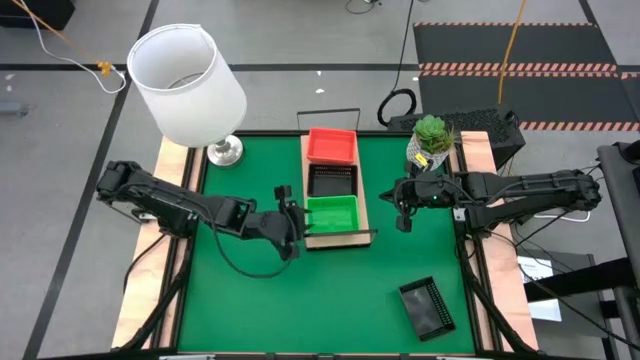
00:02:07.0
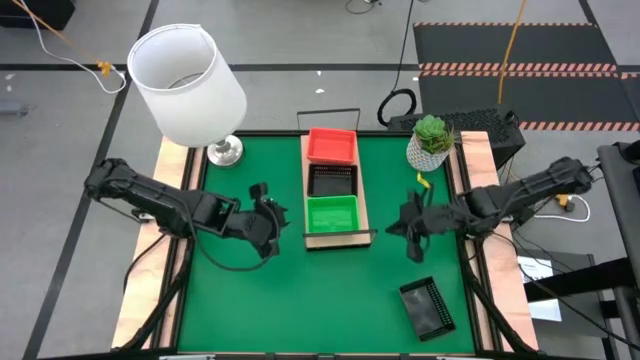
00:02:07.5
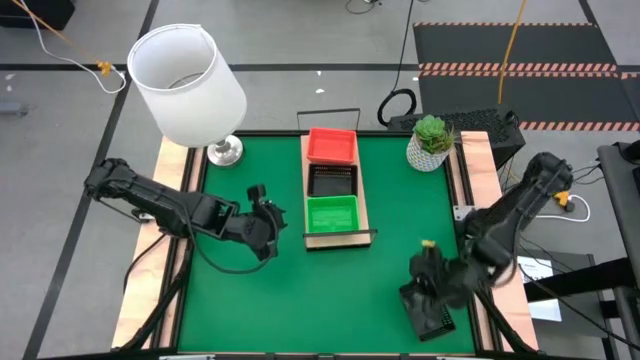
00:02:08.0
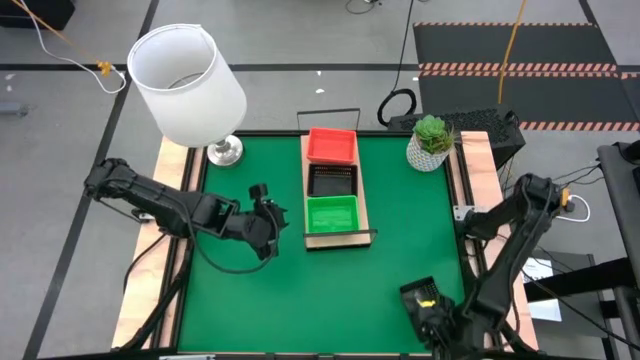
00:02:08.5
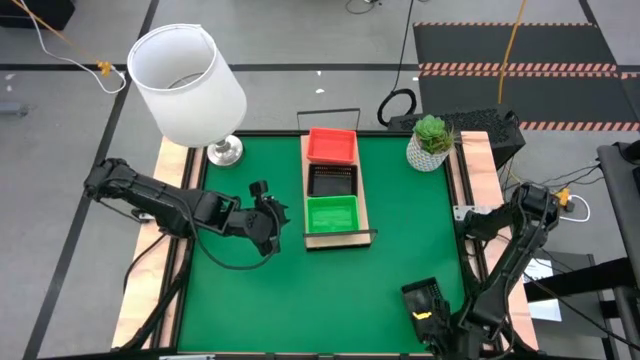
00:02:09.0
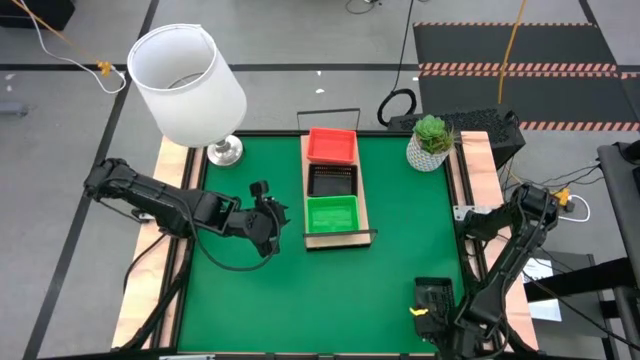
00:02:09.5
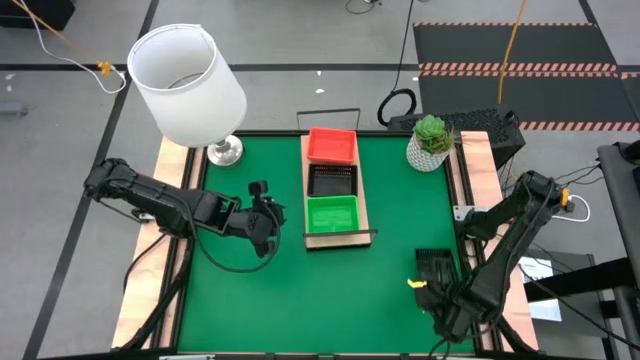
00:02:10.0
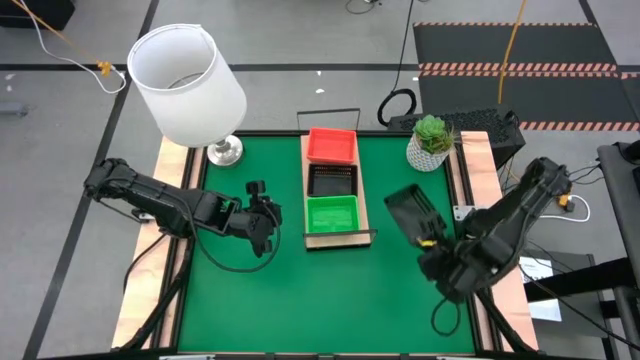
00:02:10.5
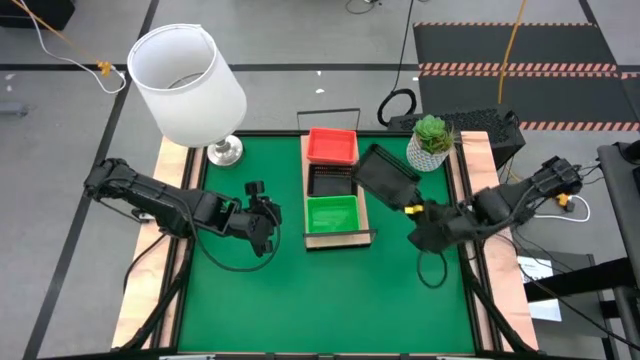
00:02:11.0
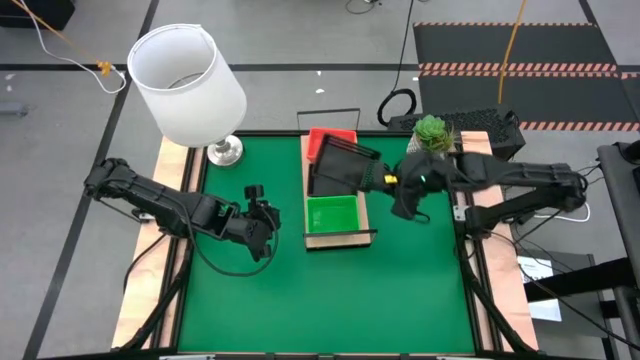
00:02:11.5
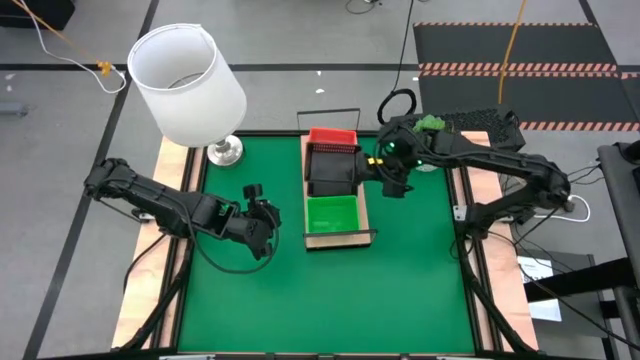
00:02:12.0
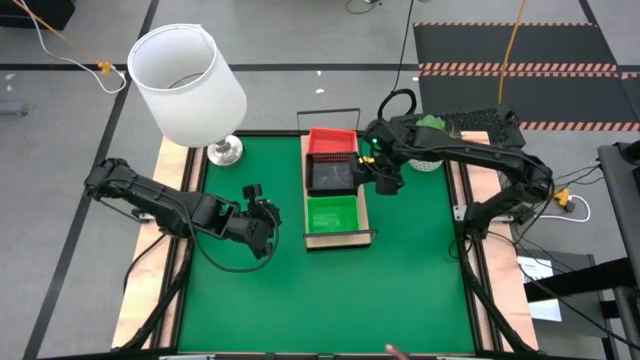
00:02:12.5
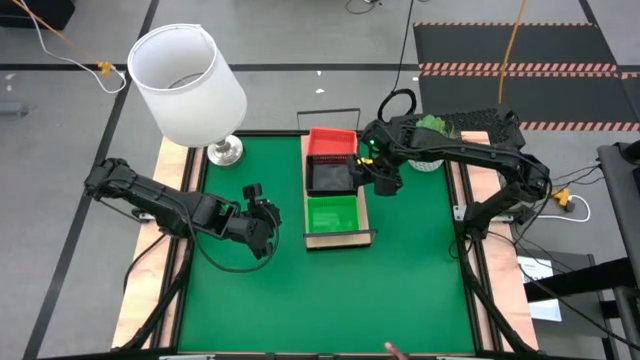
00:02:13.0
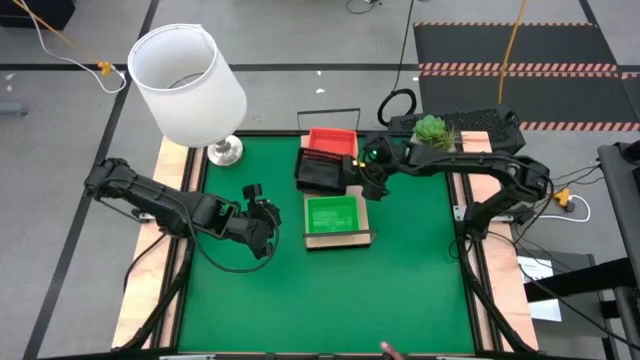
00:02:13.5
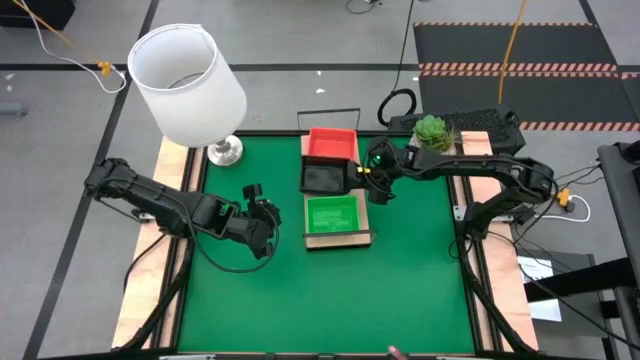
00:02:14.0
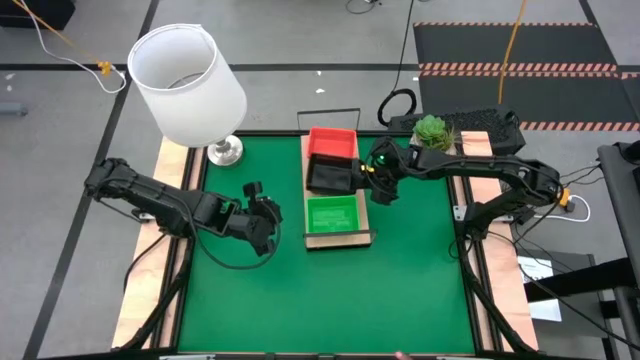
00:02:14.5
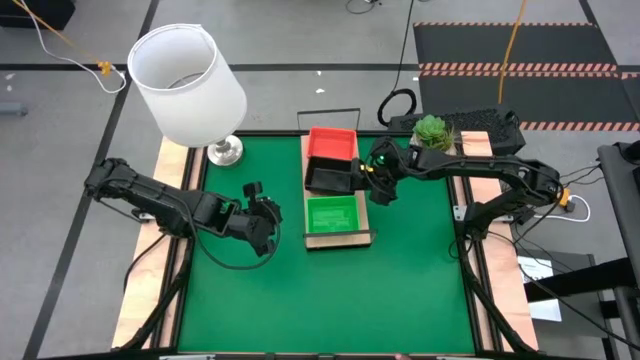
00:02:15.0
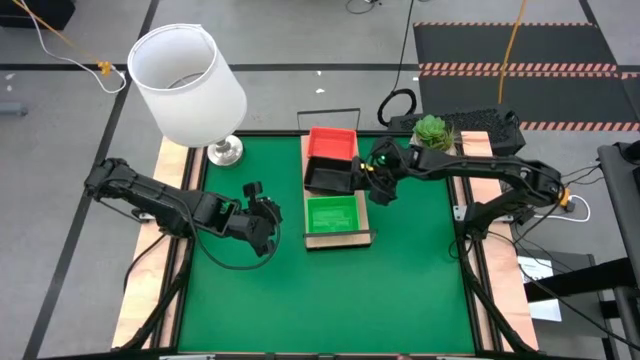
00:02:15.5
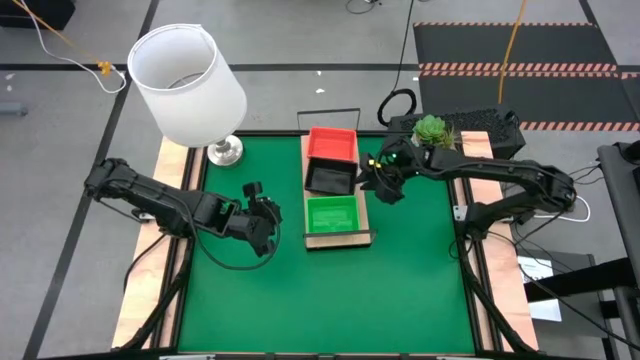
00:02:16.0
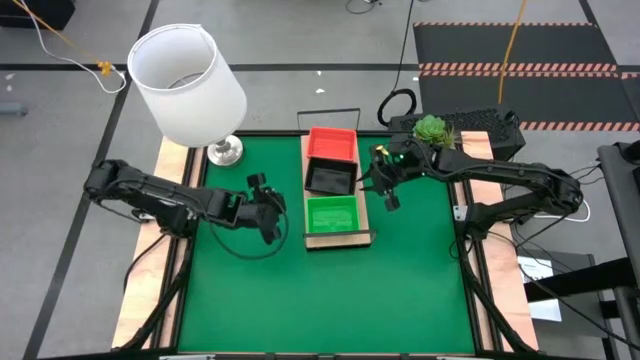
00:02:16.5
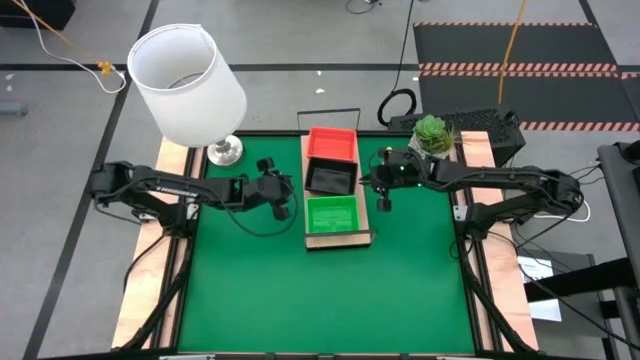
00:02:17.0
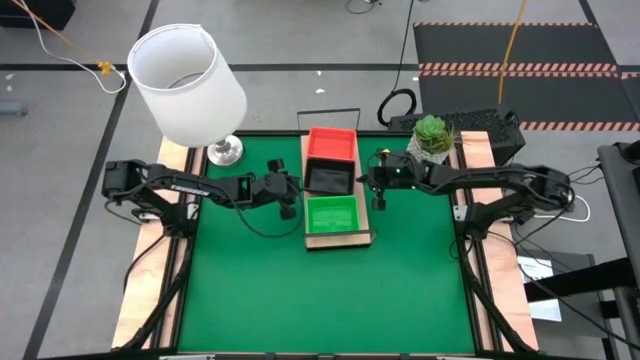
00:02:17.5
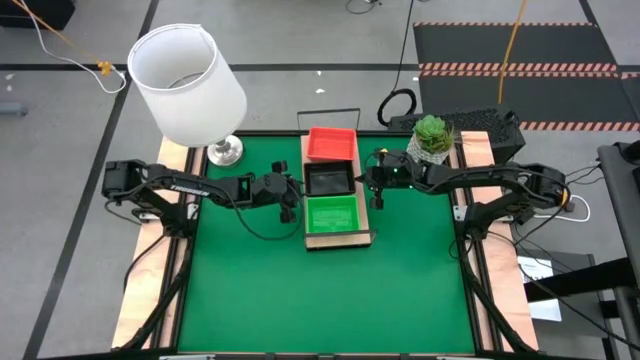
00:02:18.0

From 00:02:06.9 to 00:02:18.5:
Task: Stack baskets on shelf by color
Stack the black bin on the black bin on the shelf

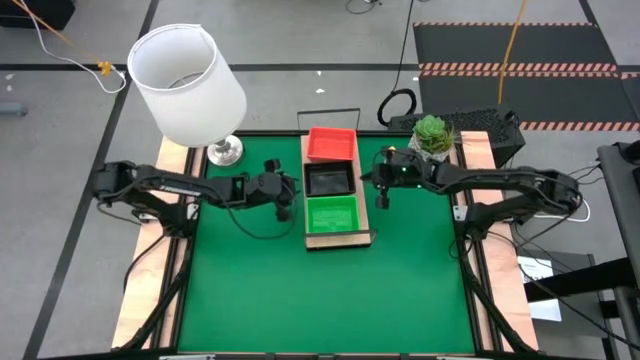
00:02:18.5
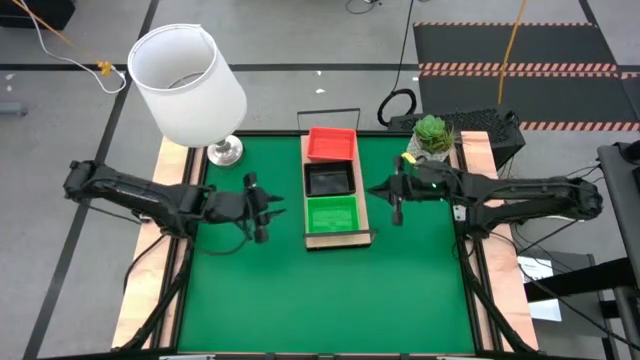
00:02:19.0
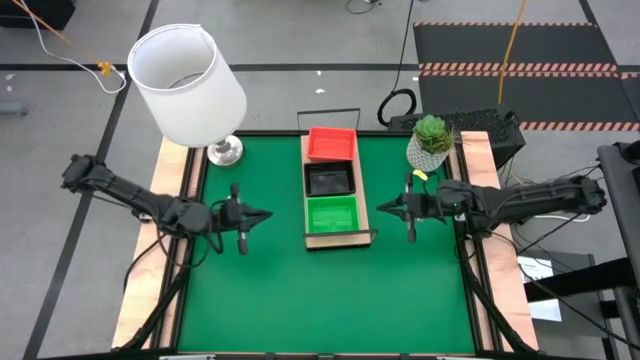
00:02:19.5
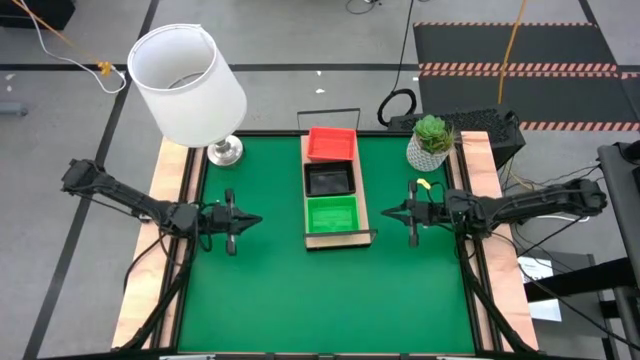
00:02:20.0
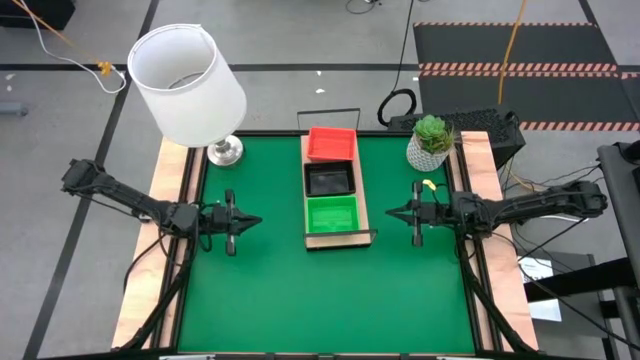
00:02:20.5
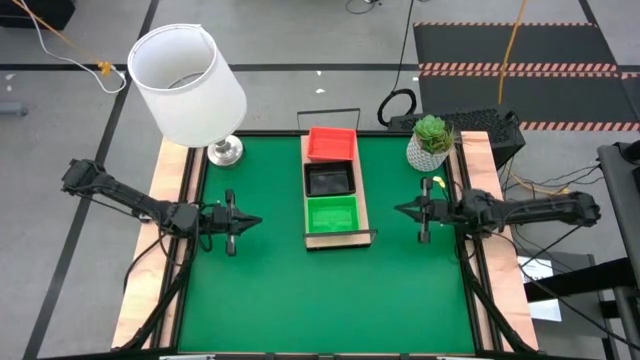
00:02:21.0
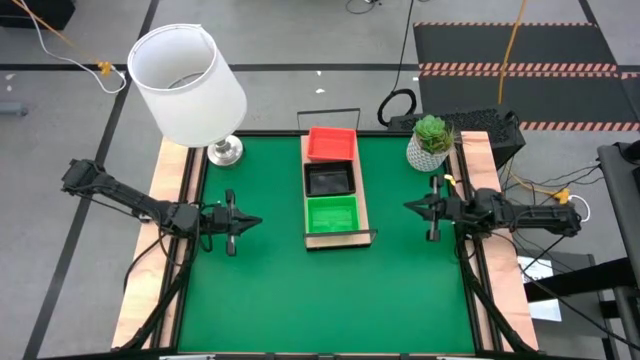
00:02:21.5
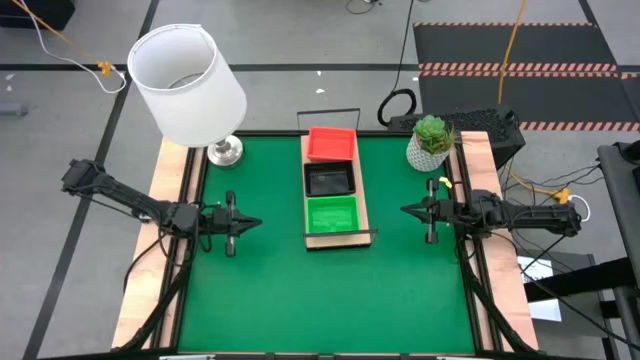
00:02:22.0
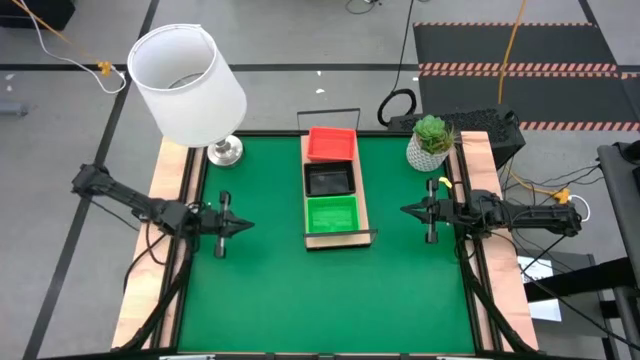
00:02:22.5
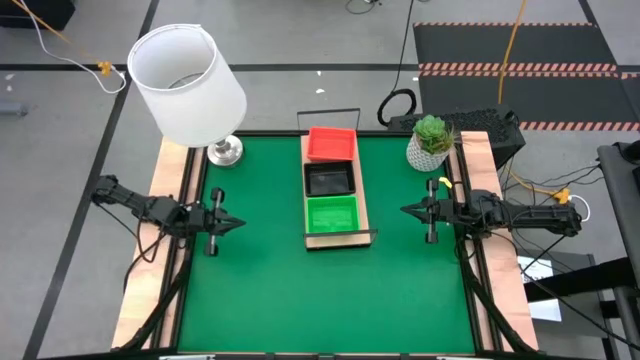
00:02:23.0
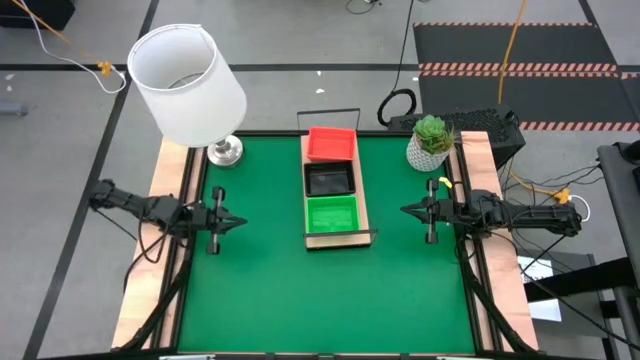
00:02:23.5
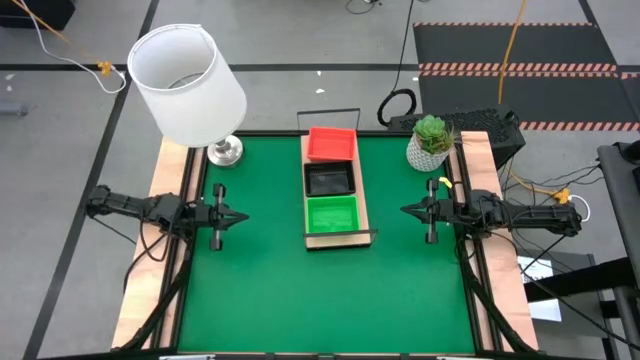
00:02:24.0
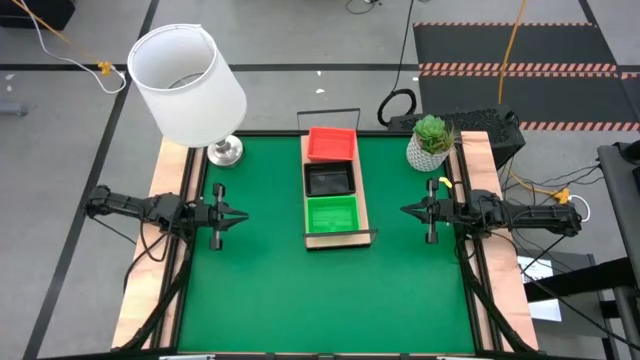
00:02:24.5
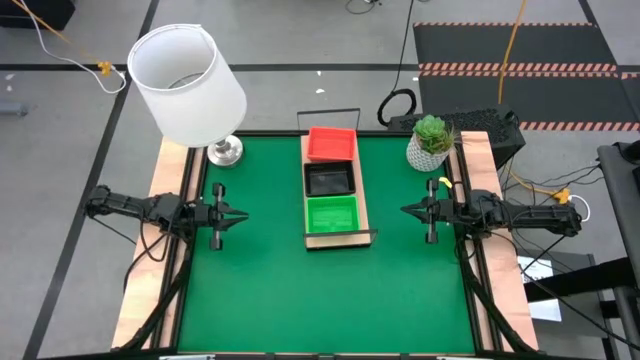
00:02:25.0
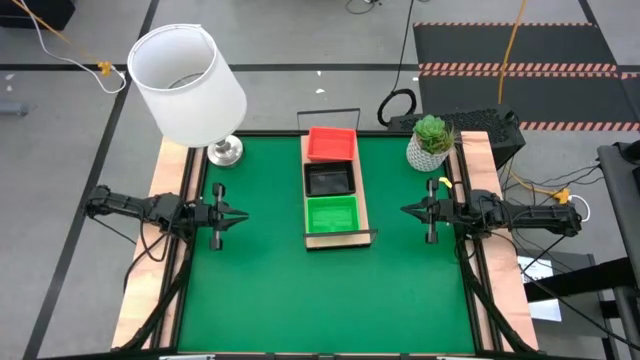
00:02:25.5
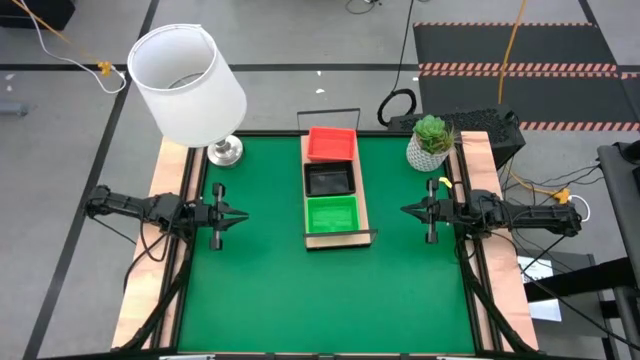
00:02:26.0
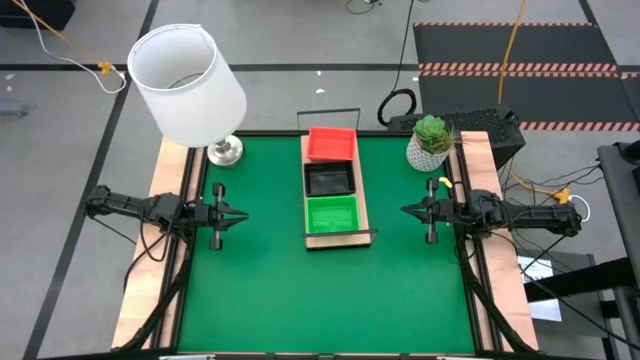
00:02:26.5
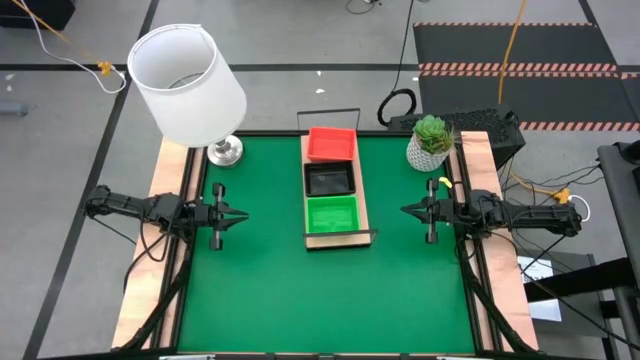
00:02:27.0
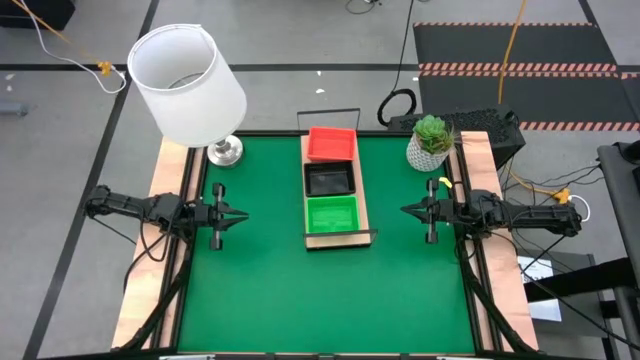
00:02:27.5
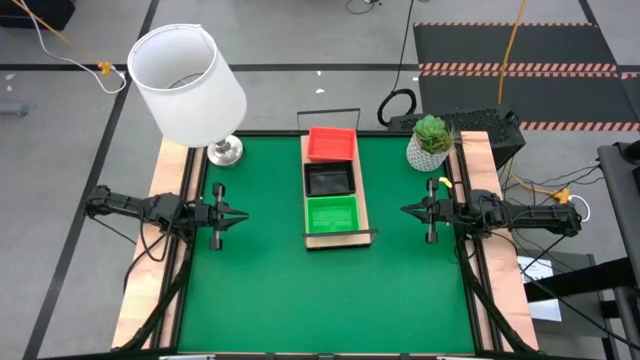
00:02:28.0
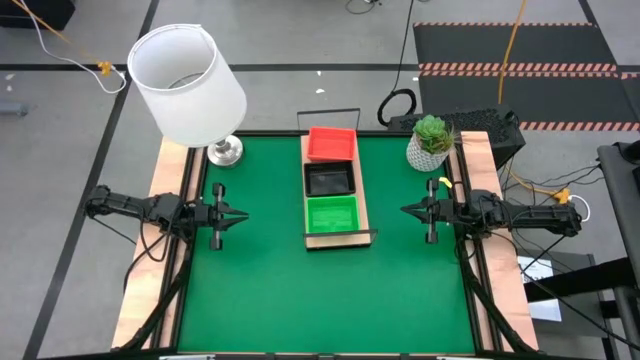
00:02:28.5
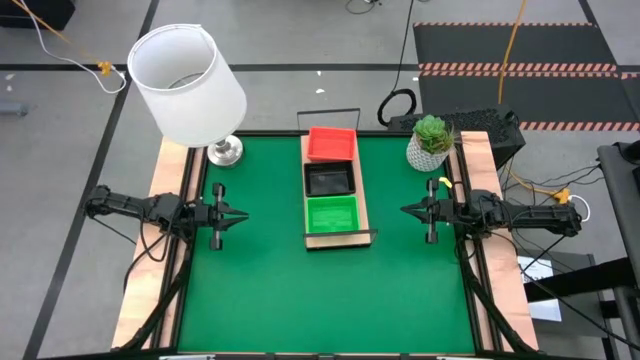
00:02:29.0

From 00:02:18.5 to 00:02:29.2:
Return to Home Position

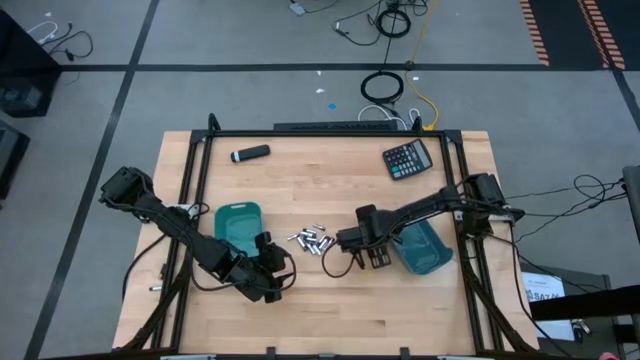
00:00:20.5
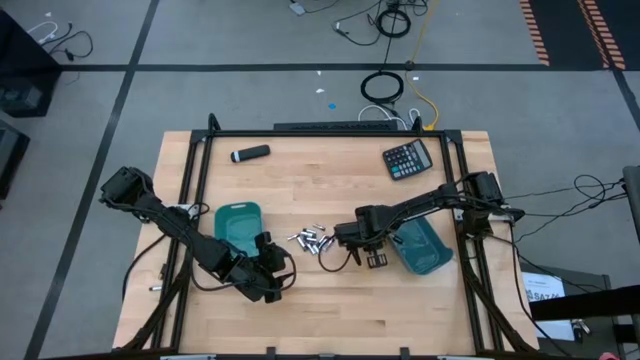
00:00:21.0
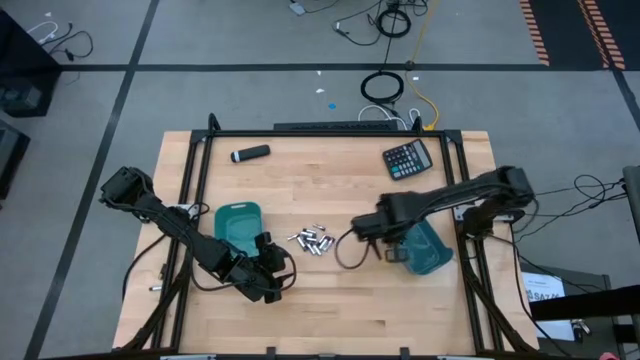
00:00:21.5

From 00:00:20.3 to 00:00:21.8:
Task: Sort batteries
Put the black battery into the blue bin
